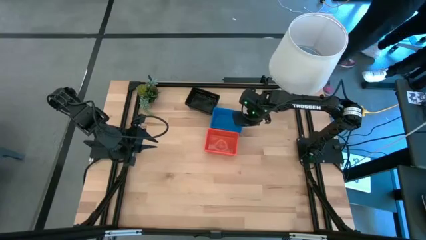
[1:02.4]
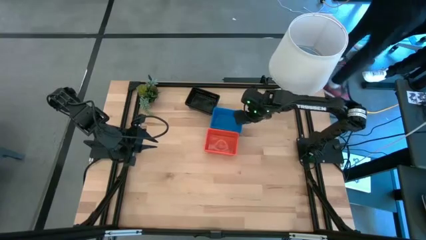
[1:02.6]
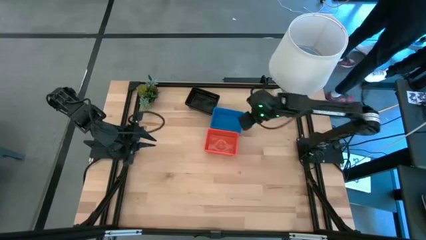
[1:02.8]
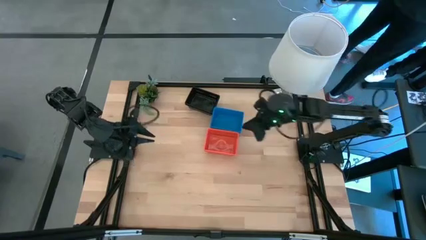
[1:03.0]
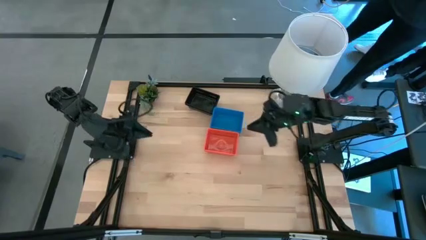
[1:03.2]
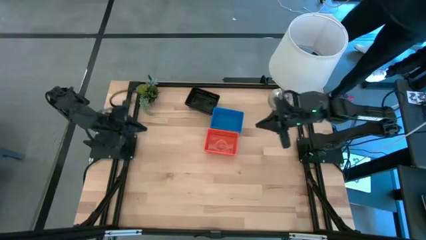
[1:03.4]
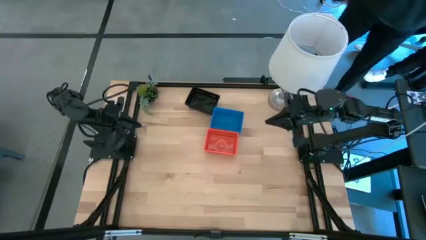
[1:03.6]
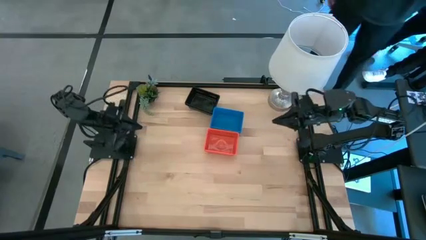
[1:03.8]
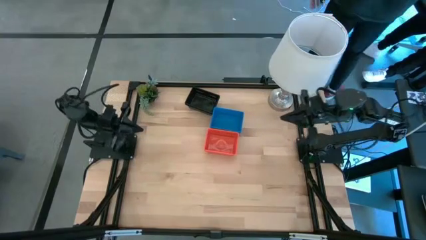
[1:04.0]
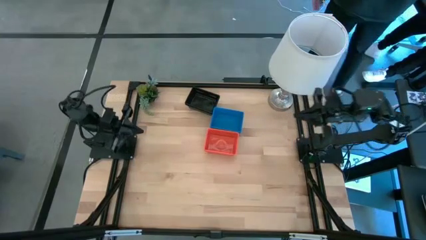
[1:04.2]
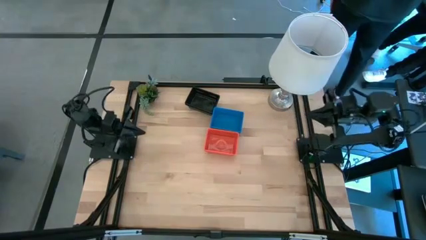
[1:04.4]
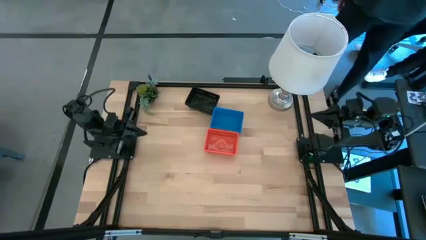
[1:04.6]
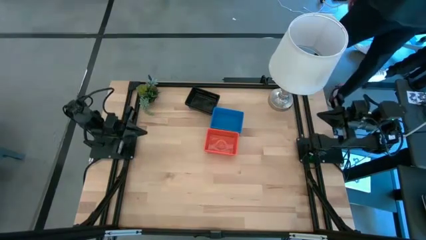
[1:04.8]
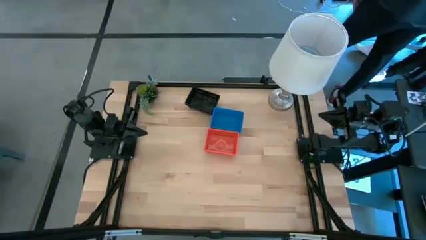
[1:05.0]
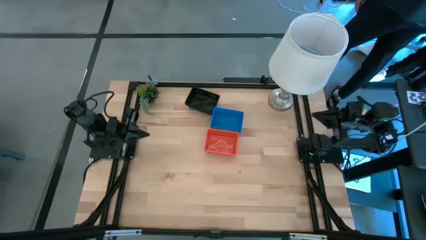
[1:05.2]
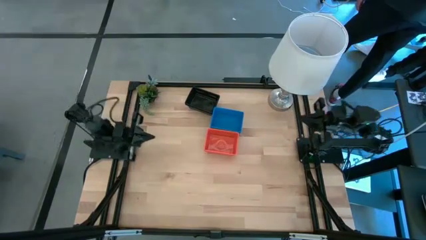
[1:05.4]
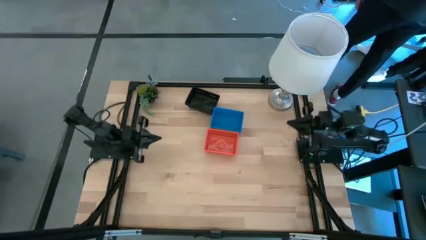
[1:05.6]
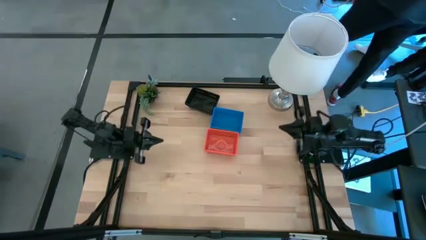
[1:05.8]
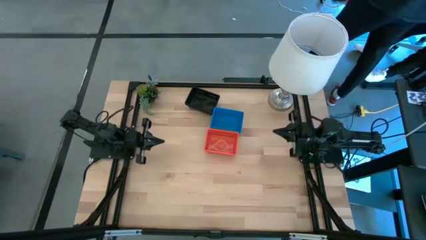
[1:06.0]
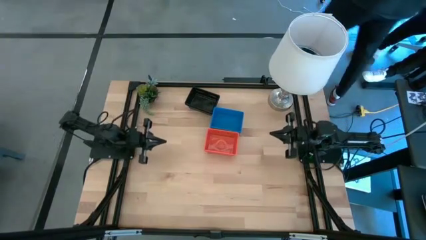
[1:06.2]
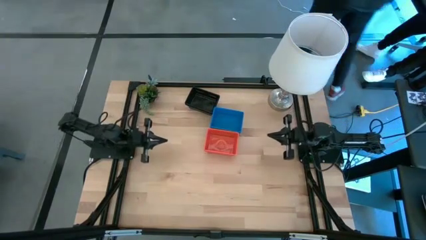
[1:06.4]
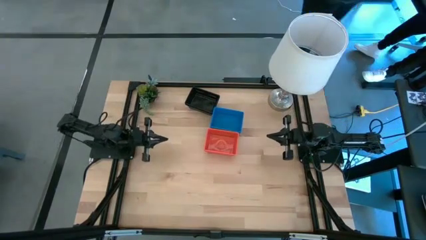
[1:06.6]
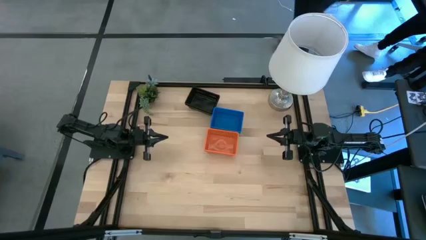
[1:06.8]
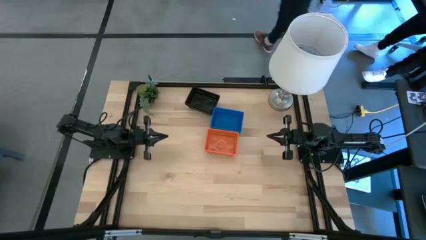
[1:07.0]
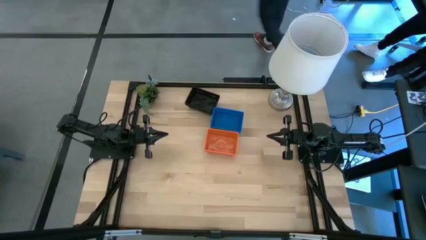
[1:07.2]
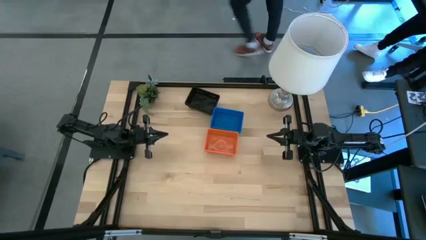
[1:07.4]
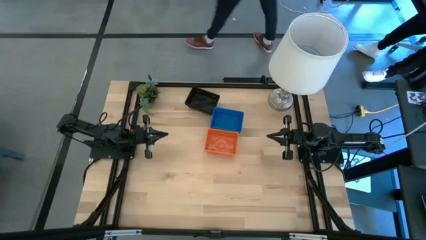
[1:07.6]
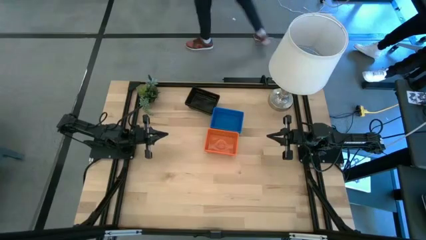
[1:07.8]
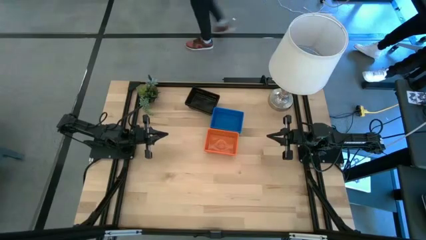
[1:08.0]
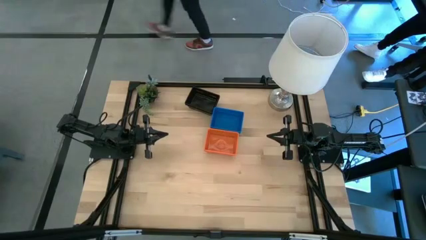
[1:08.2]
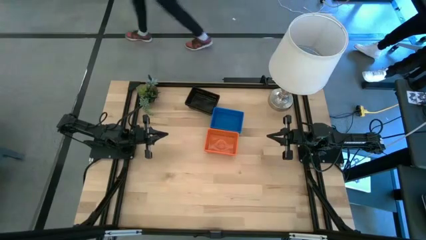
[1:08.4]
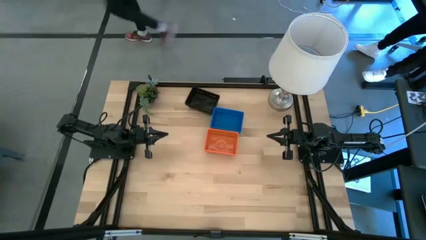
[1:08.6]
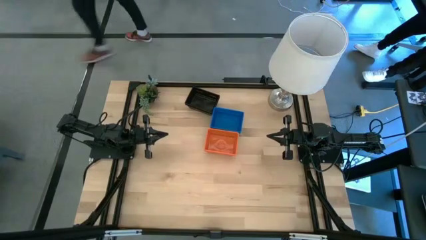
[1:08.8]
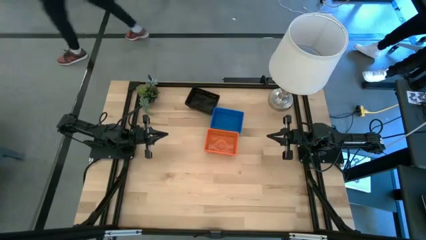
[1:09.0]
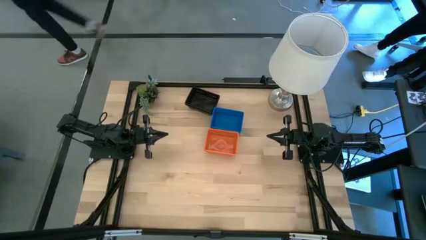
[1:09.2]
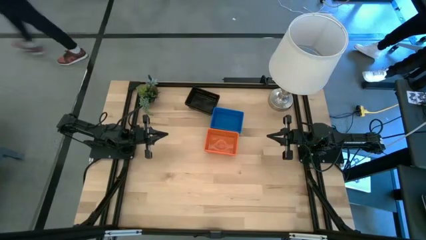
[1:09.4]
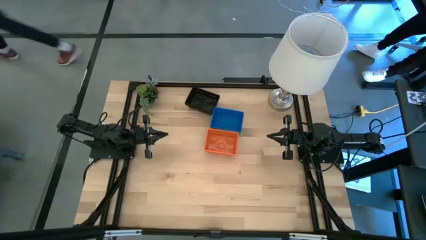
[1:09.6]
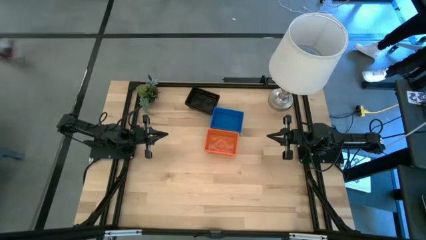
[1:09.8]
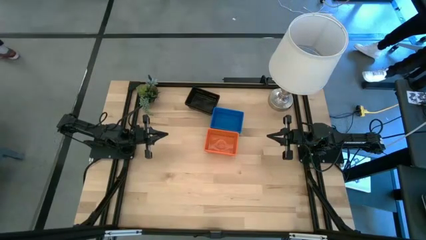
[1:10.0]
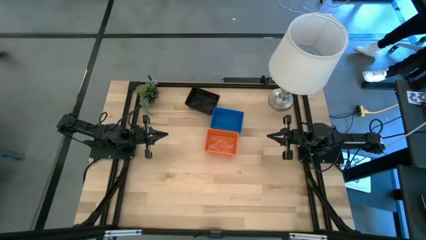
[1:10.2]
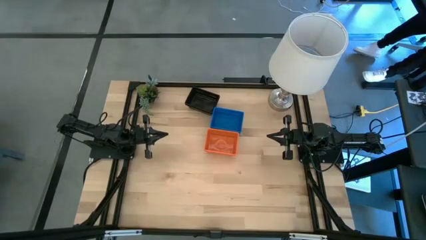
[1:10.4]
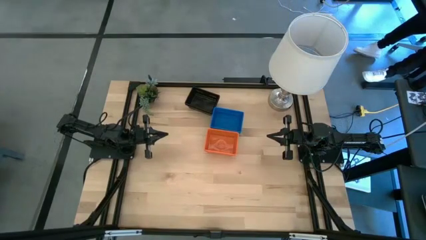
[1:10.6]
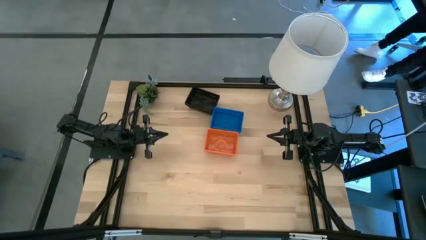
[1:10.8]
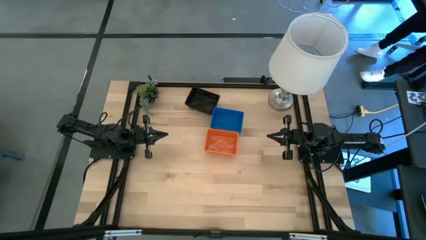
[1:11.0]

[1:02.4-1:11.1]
Return to Home Position
